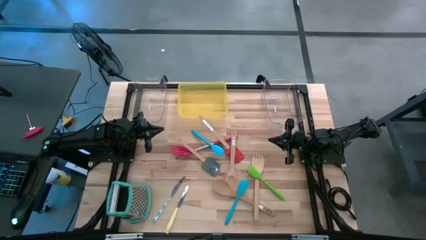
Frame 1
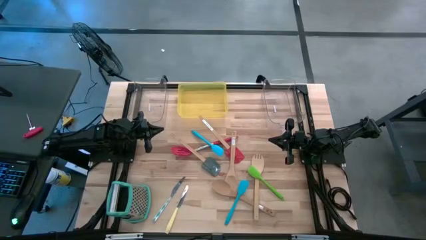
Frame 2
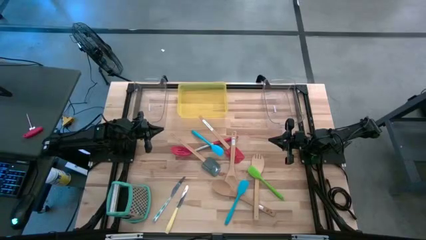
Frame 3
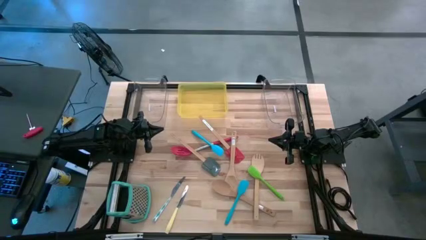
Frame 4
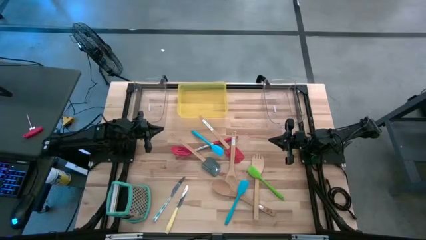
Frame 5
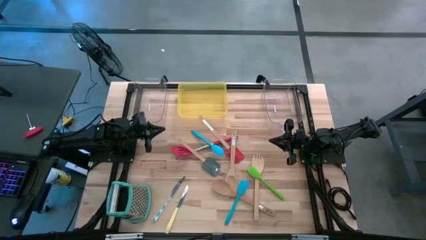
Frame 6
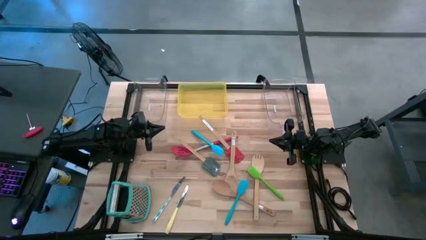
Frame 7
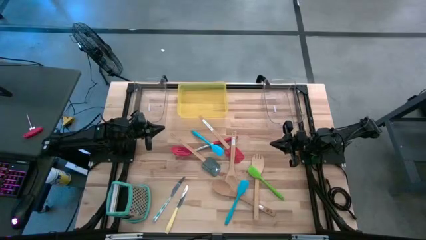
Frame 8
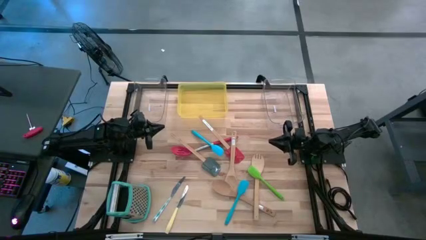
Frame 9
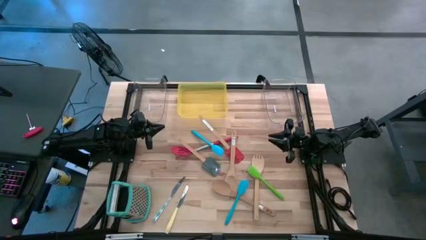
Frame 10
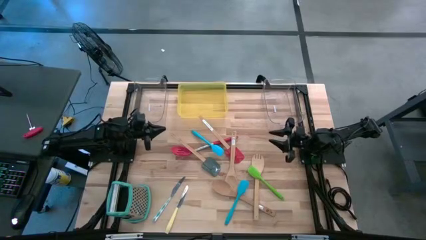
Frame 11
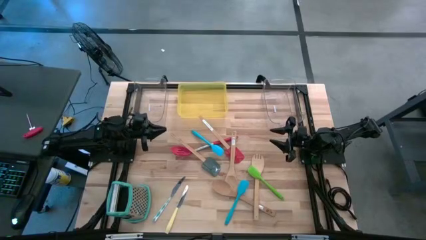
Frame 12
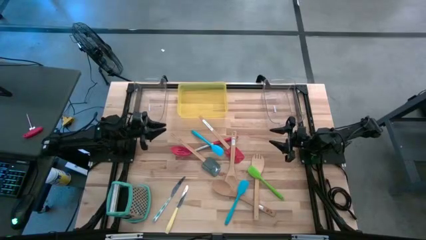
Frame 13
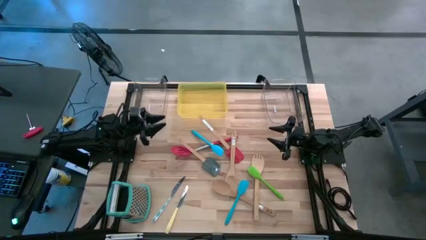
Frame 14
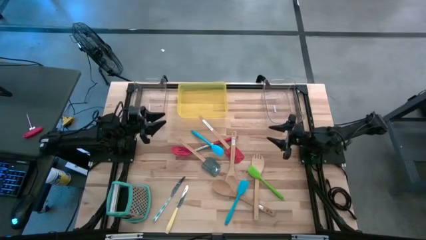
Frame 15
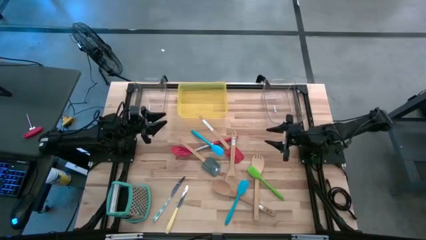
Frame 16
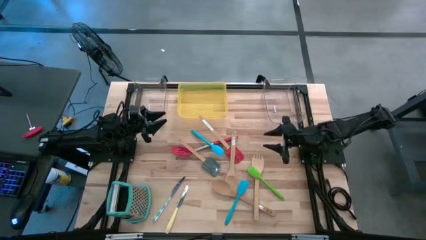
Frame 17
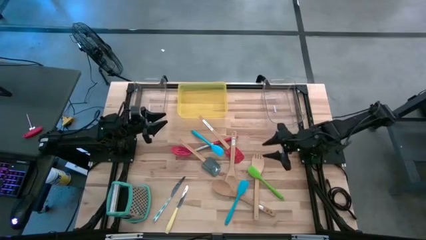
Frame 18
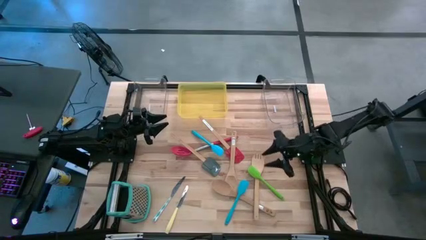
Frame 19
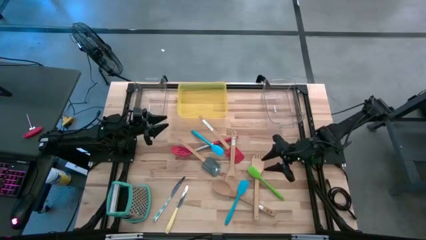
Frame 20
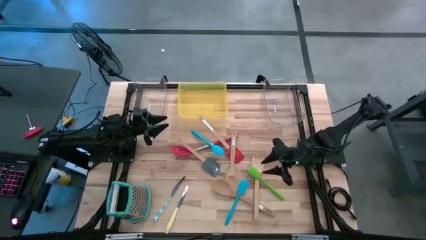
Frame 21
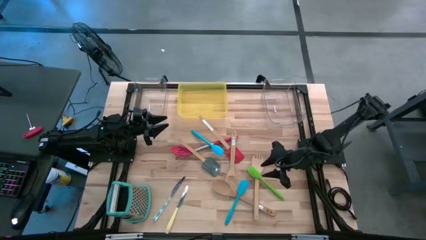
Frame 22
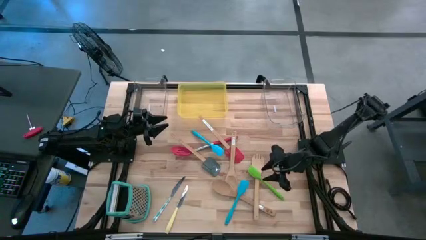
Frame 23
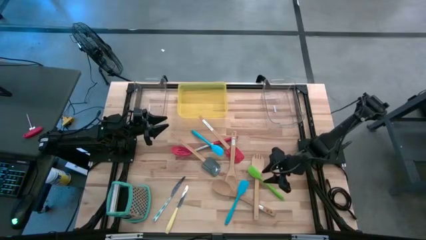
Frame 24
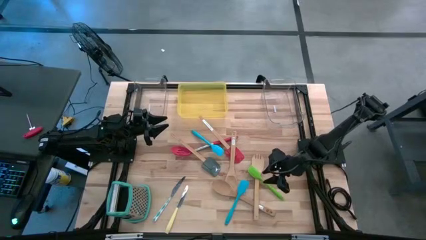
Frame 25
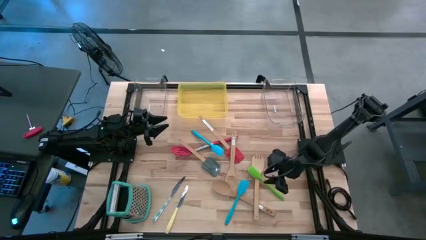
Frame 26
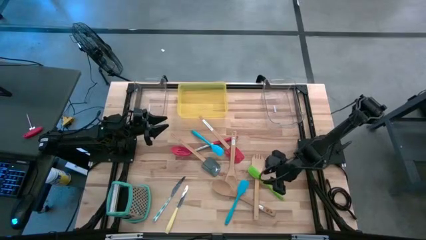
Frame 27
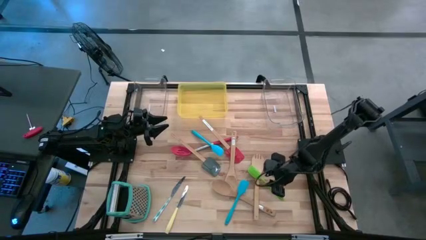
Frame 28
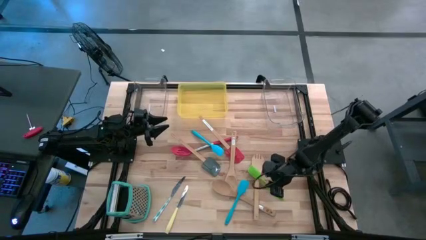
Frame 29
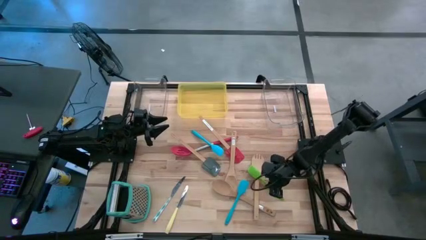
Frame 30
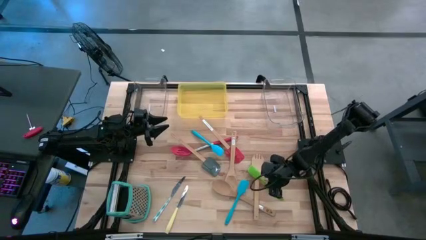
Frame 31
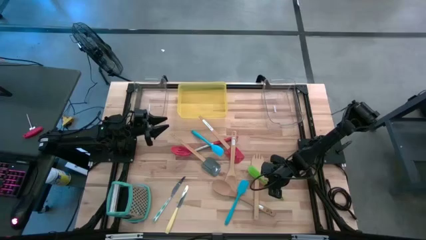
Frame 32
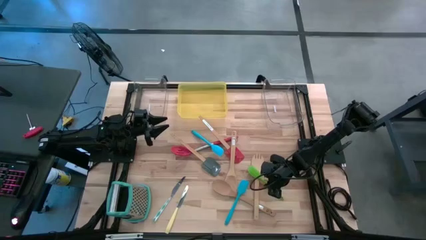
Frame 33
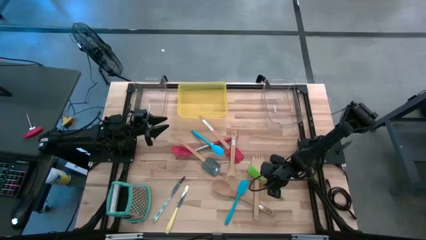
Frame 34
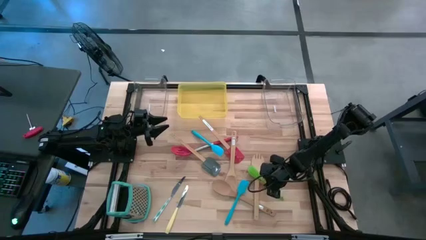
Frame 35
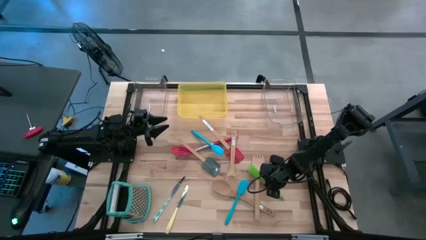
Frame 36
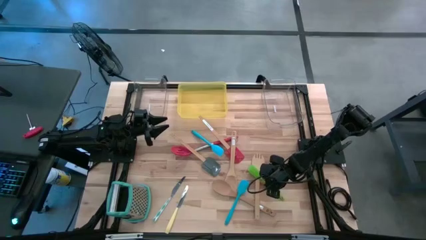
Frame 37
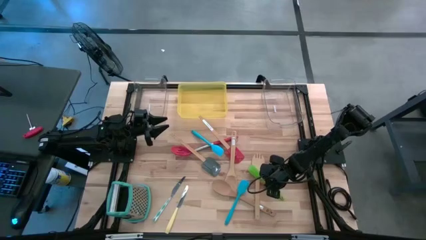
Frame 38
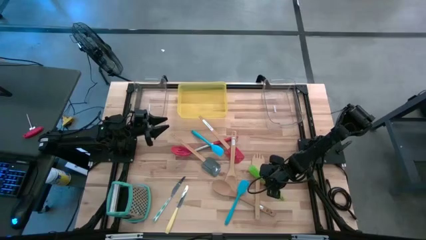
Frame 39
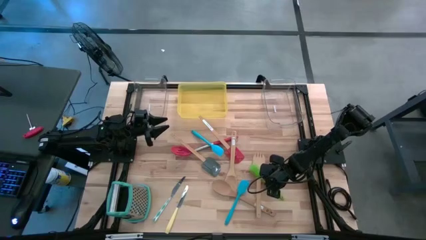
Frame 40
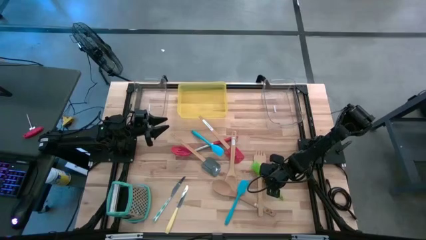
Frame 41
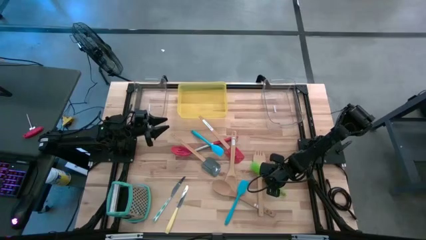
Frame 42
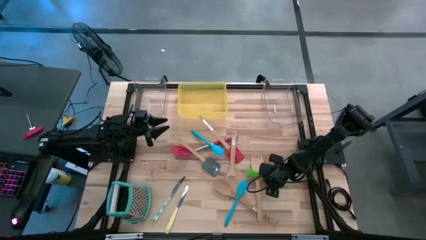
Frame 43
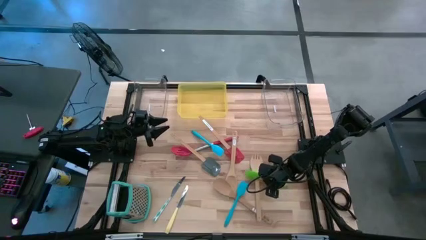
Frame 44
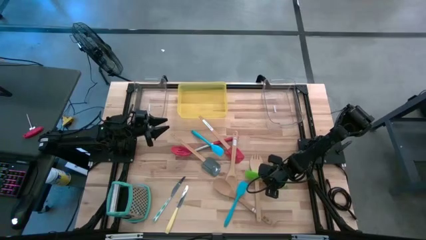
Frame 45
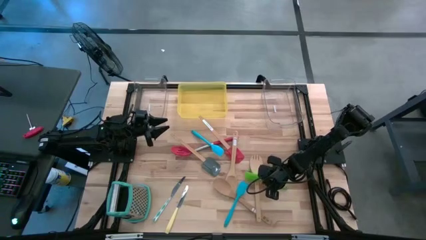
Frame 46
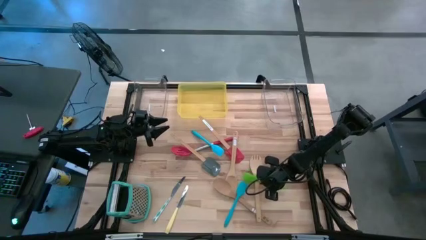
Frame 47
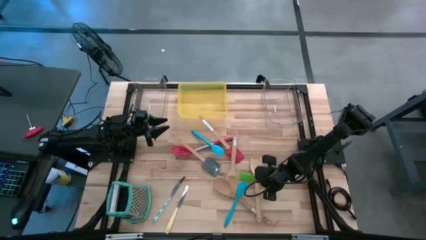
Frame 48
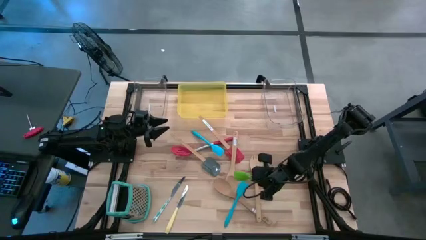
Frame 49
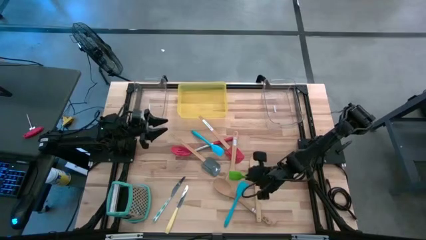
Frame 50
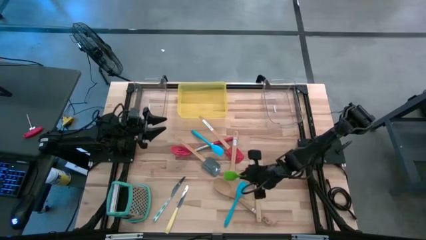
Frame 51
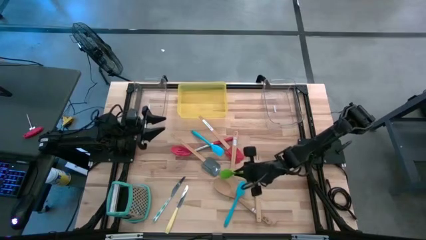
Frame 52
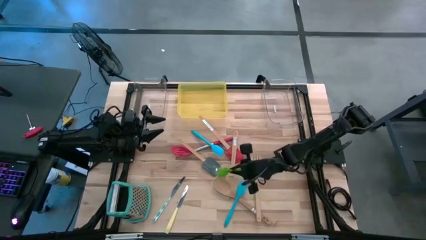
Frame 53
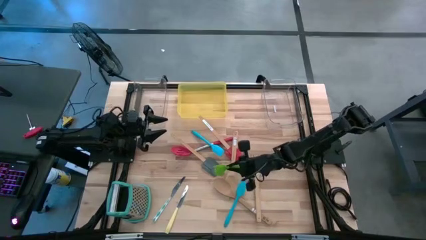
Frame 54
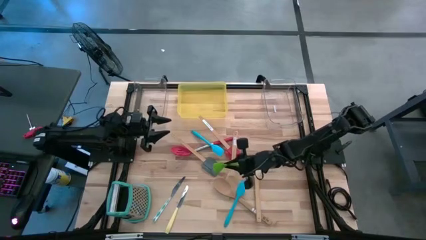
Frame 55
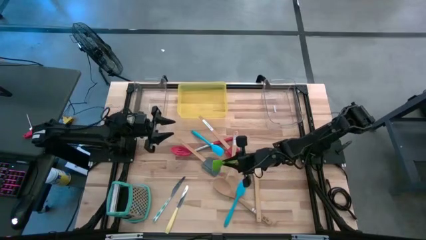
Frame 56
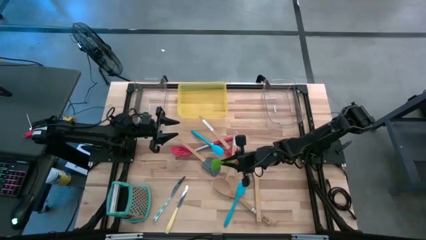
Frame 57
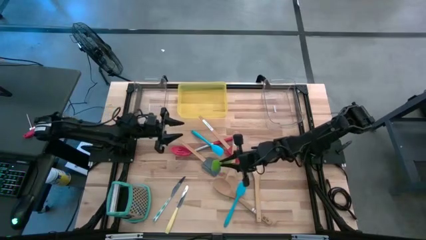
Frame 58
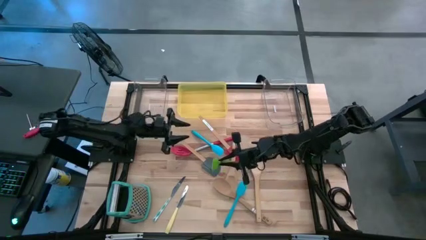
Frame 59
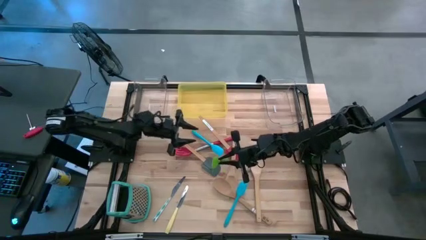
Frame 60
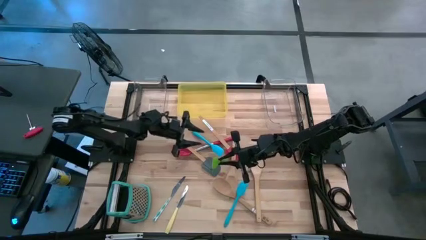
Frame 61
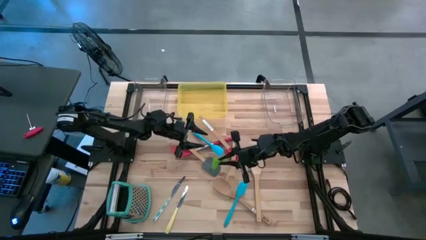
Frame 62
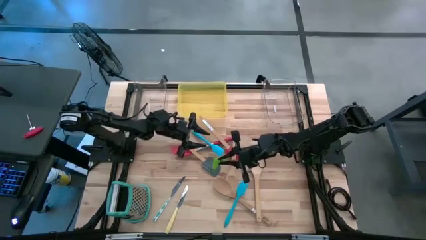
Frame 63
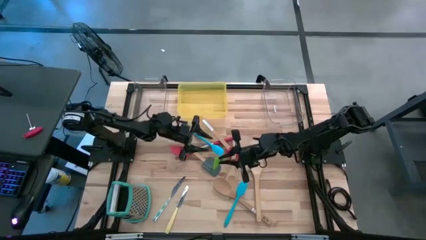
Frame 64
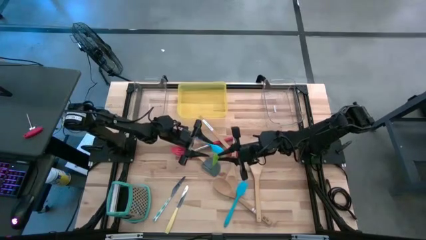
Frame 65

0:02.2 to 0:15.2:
Task: Pick & Place Kitchen Items
Put the green spatula into the yellow bin
